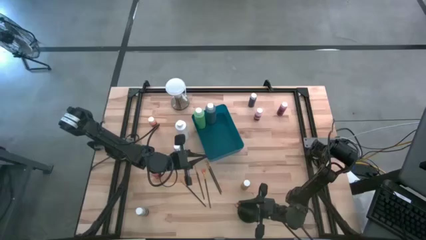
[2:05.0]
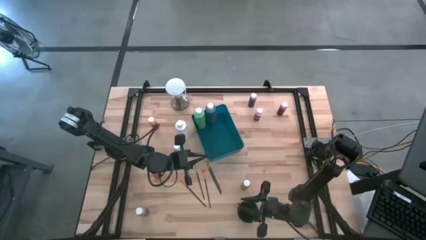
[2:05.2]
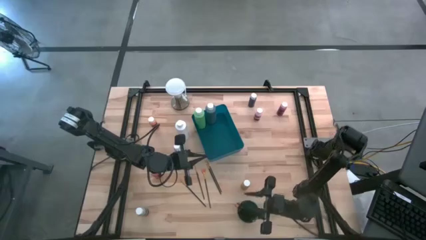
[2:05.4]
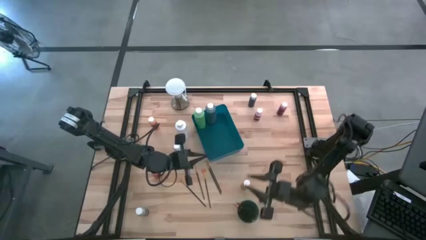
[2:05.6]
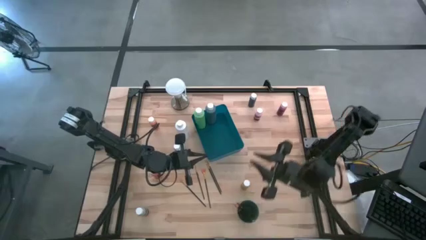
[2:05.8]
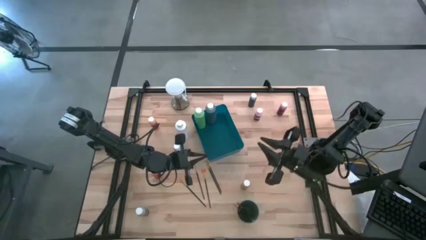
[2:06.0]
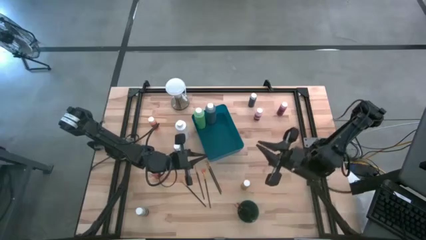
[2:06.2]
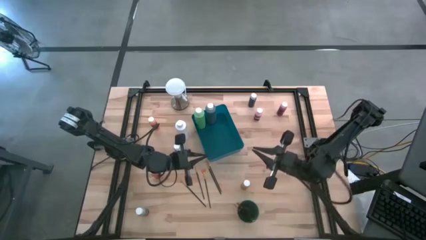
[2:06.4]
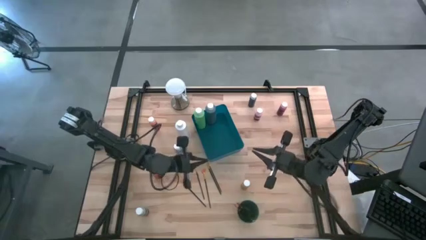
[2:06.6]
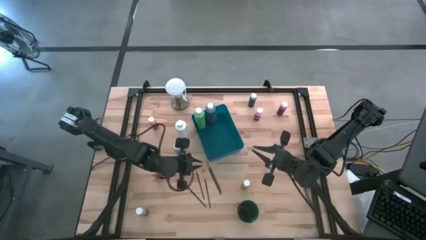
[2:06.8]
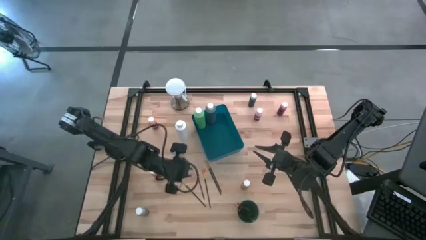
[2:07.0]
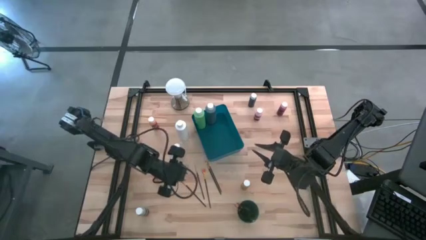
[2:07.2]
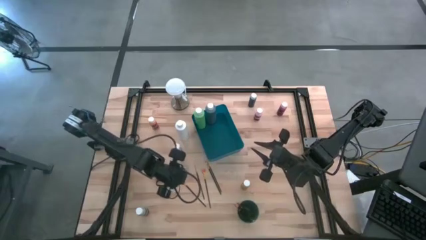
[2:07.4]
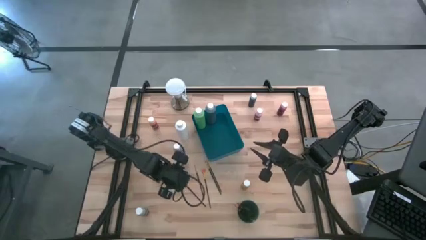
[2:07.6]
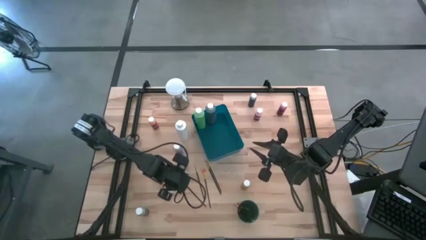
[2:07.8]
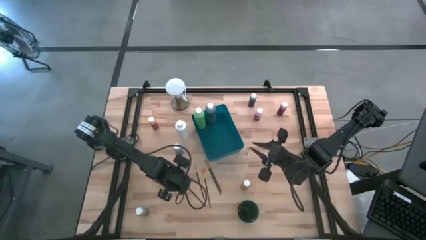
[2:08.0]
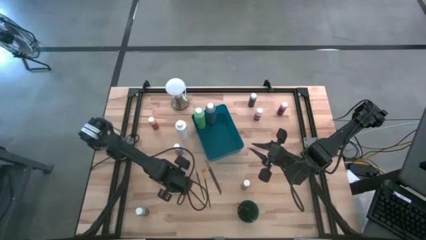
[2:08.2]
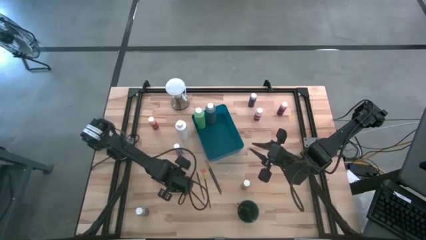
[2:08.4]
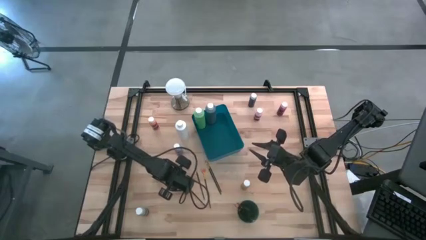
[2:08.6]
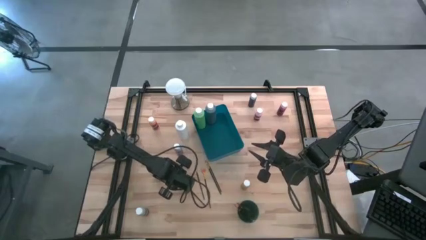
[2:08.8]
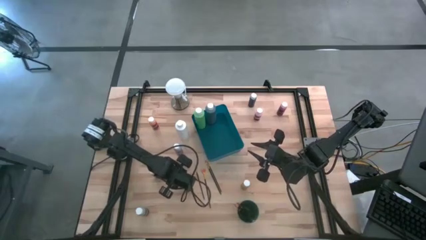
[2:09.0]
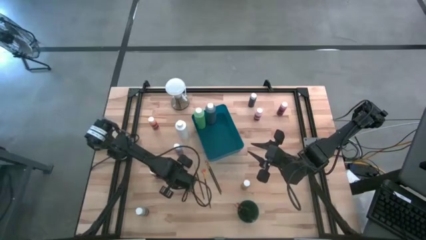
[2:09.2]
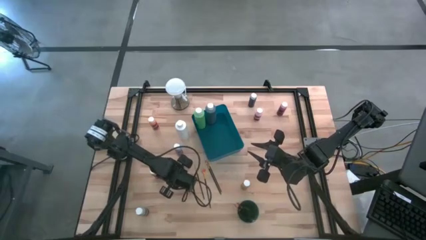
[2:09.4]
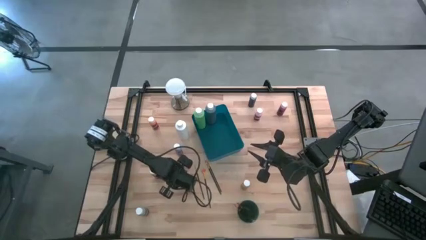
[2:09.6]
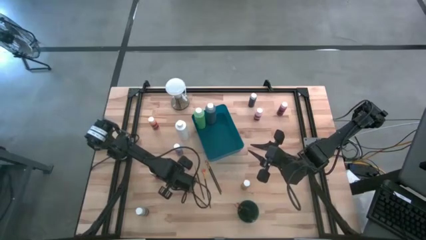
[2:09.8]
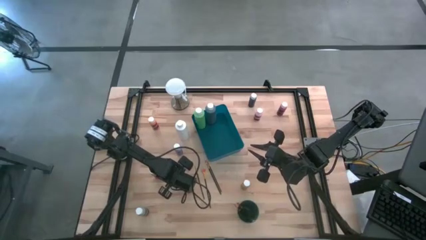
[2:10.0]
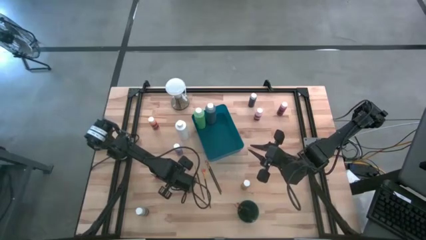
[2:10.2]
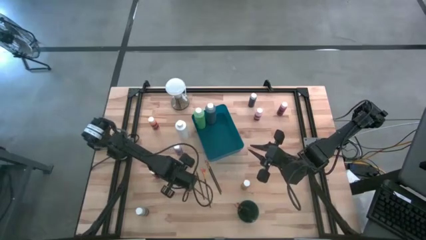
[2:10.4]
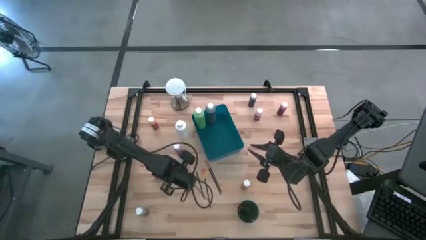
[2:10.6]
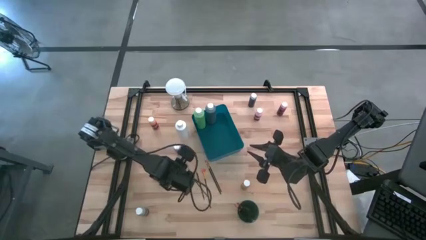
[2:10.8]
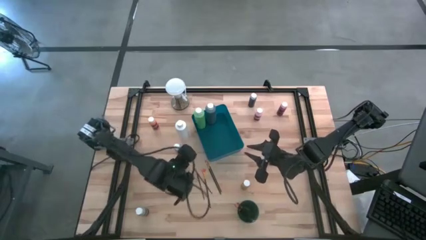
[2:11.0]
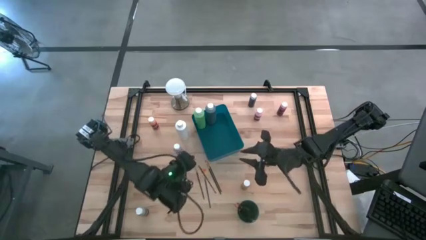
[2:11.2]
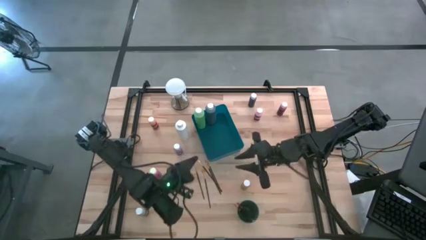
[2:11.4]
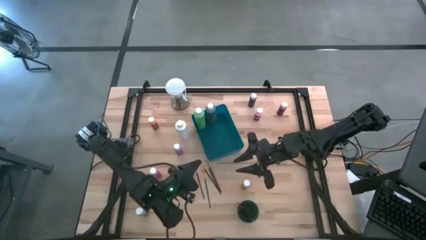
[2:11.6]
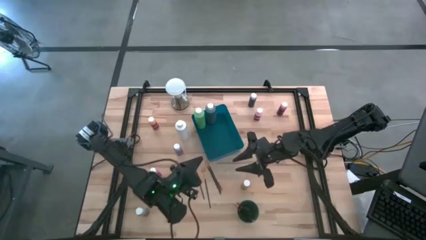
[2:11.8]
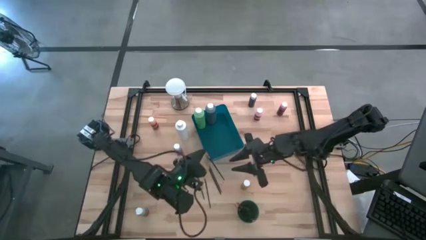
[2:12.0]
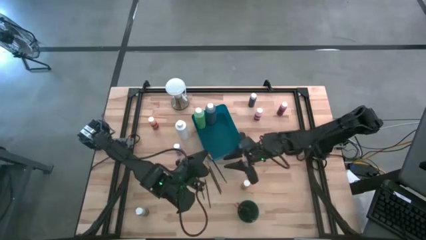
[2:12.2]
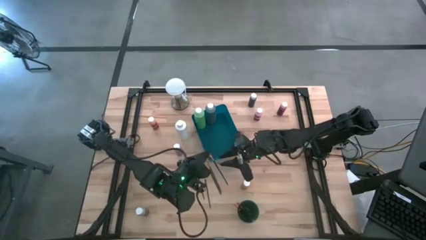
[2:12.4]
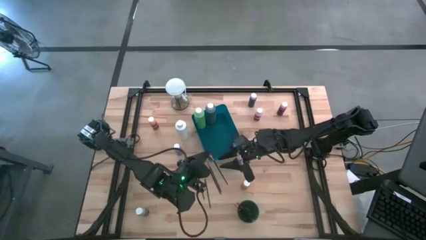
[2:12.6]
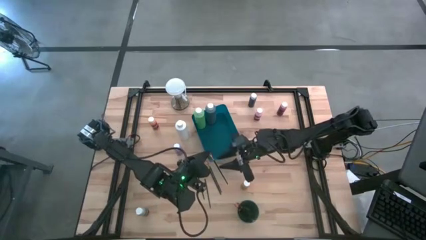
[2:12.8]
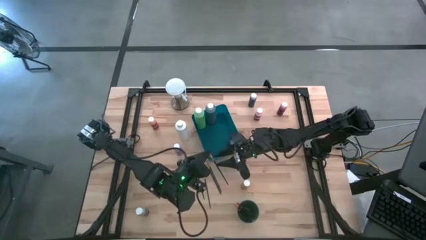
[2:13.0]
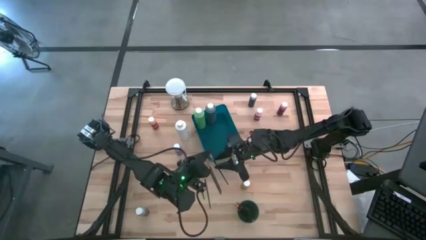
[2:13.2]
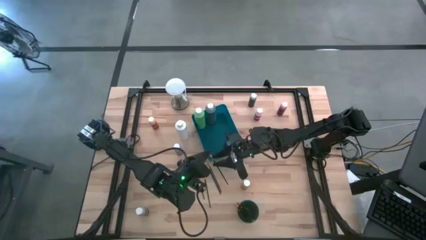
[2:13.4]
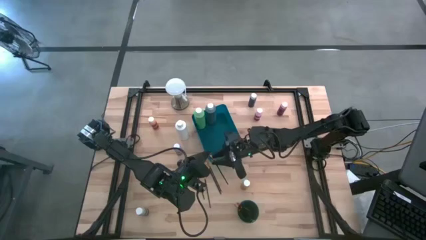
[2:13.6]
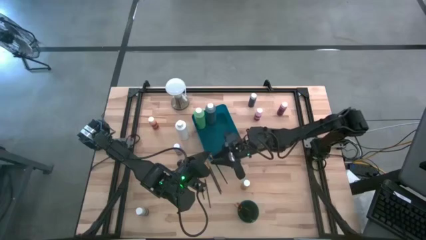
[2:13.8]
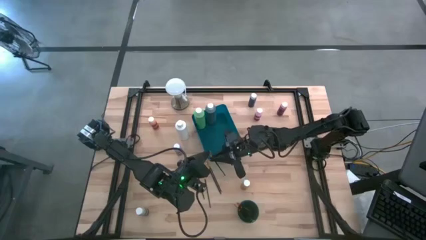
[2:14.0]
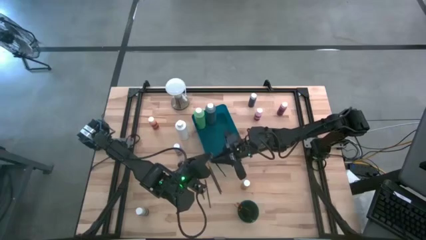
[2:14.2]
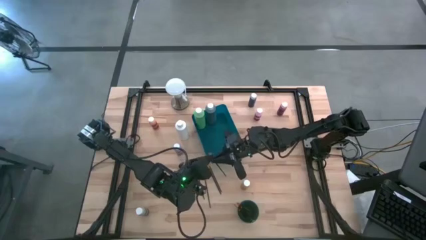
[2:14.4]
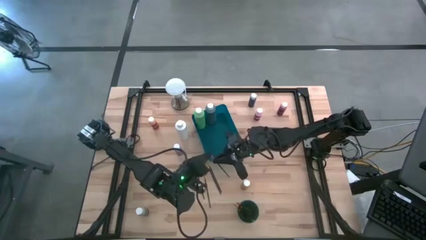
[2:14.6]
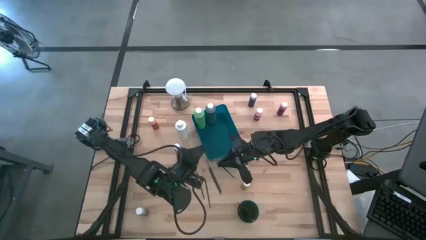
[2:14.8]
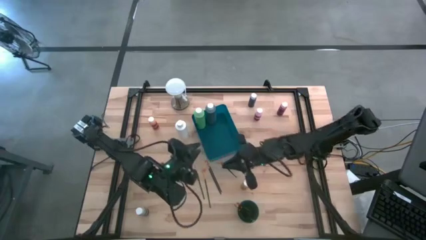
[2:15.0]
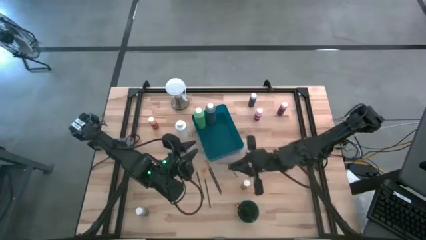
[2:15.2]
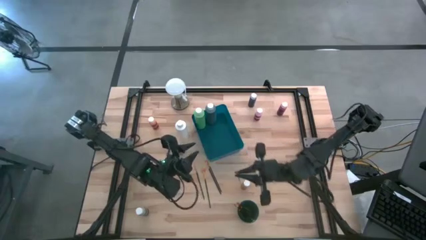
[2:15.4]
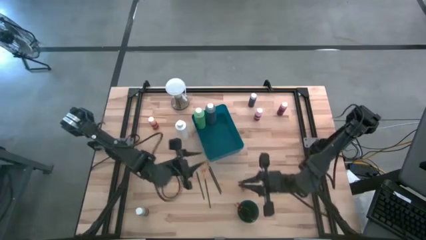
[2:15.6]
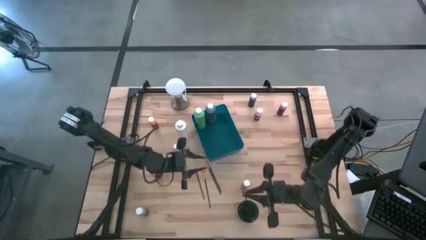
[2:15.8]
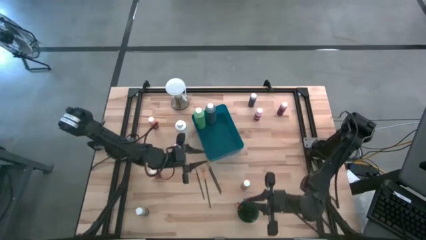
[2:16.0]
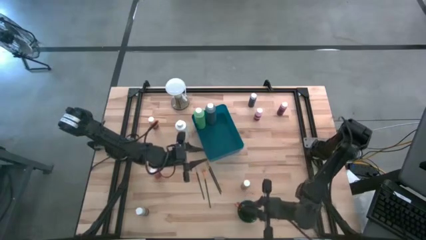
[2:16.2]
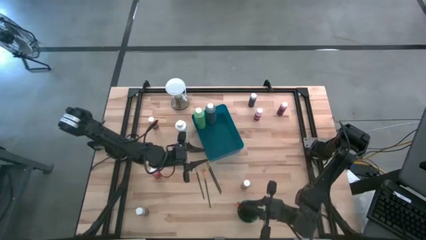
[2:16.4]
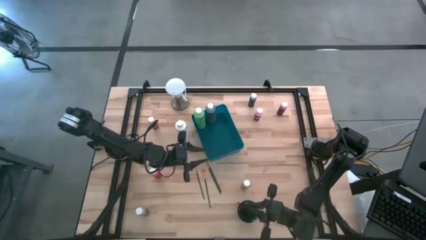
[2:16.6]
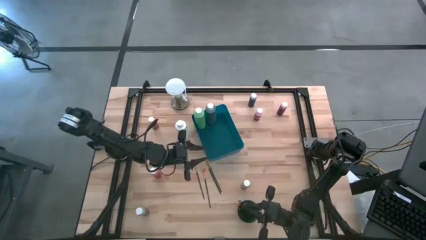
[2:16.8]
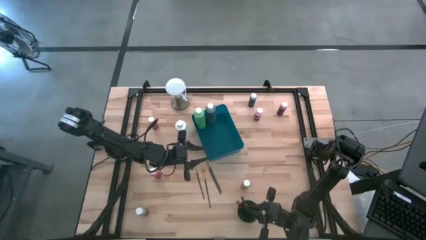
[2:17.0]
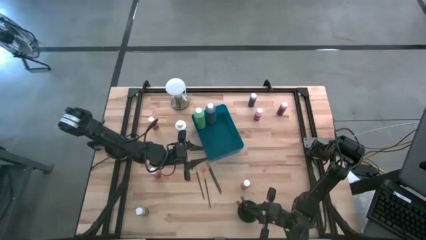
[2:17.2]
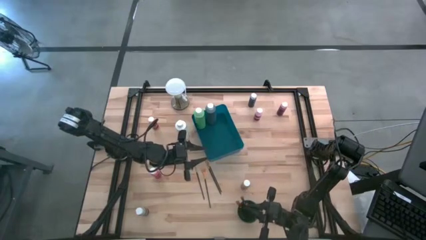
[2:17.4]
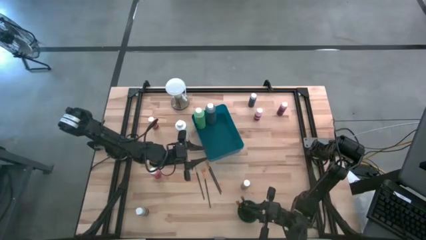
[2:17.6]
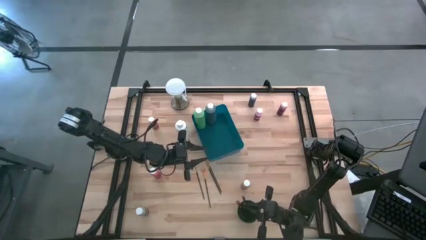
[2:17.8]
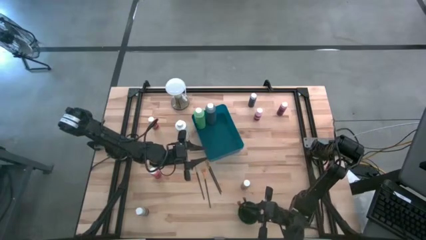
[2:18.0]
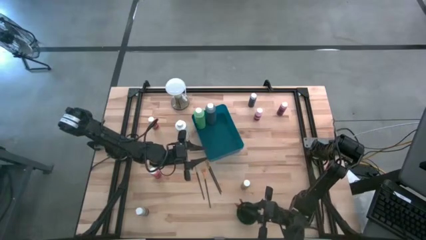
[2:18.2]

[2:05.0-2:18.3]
Task: Pick & Place Paint Supplies
Put the gold paint brush into the green cup
